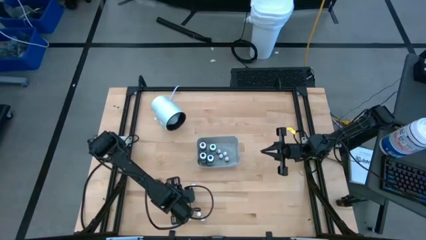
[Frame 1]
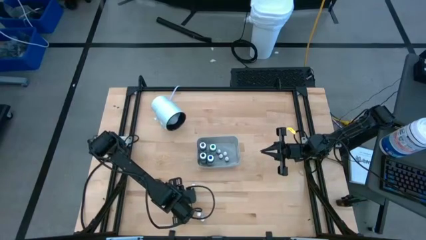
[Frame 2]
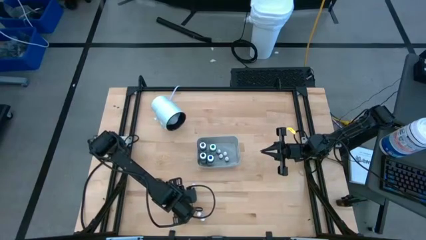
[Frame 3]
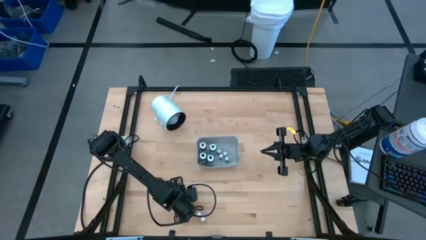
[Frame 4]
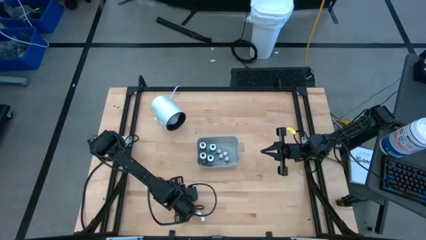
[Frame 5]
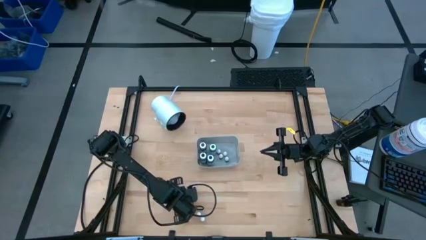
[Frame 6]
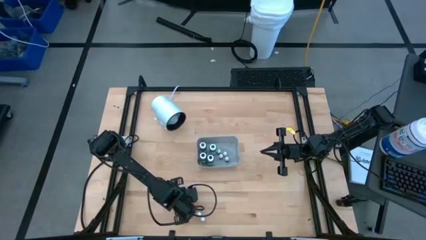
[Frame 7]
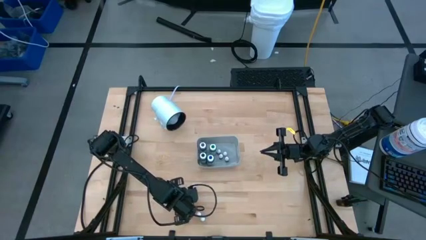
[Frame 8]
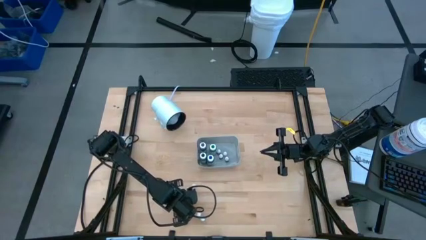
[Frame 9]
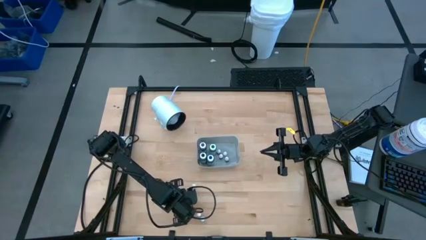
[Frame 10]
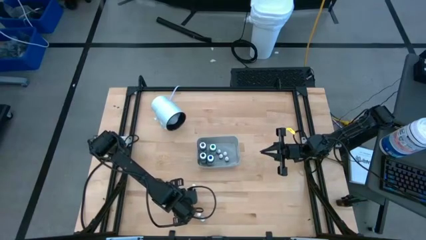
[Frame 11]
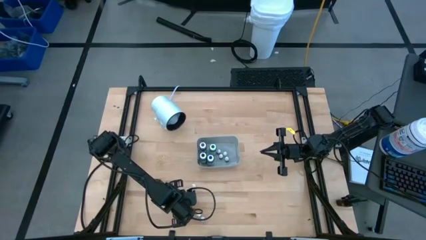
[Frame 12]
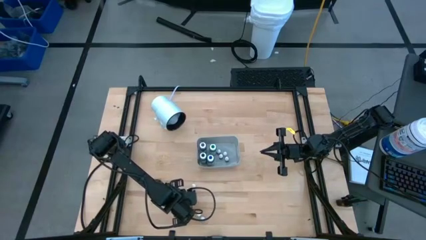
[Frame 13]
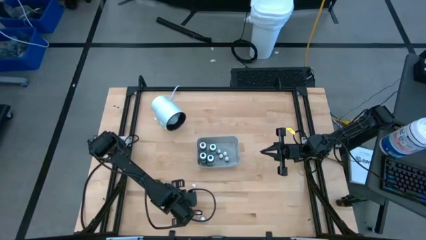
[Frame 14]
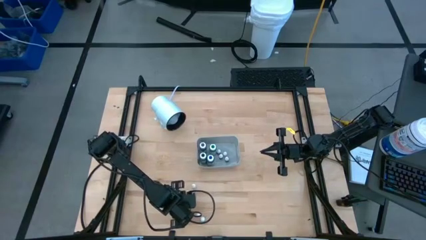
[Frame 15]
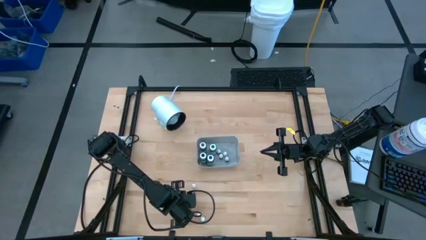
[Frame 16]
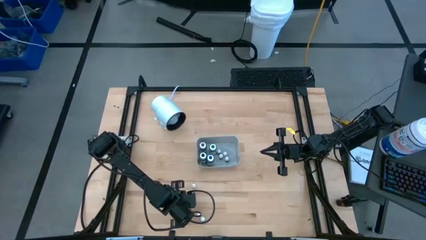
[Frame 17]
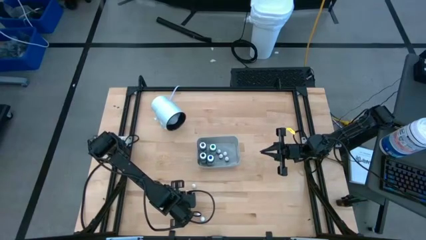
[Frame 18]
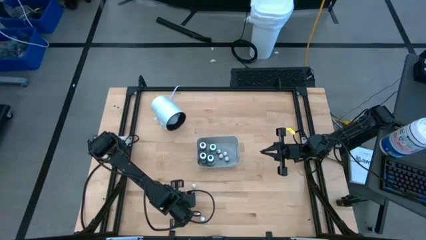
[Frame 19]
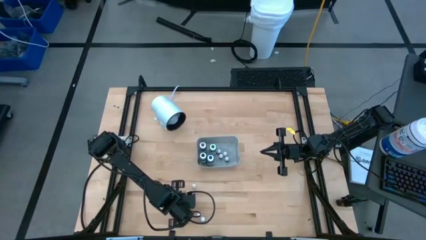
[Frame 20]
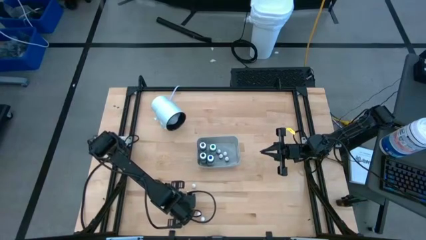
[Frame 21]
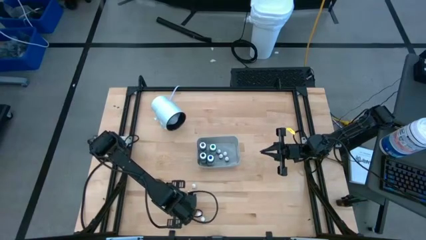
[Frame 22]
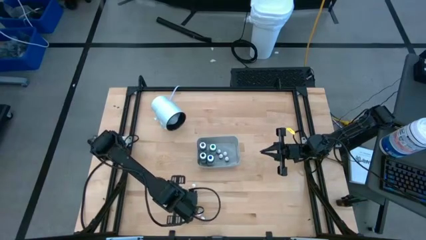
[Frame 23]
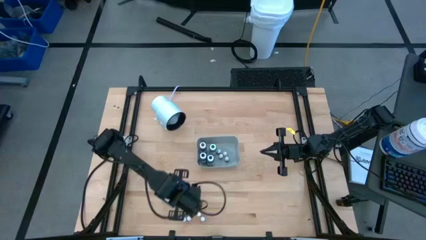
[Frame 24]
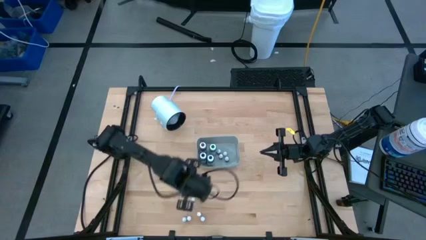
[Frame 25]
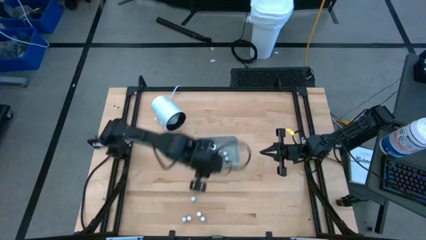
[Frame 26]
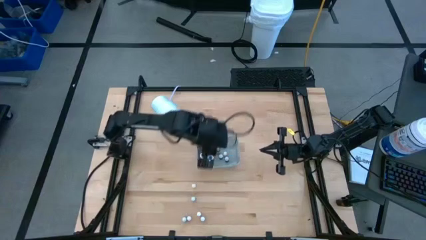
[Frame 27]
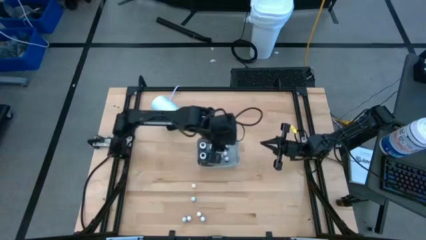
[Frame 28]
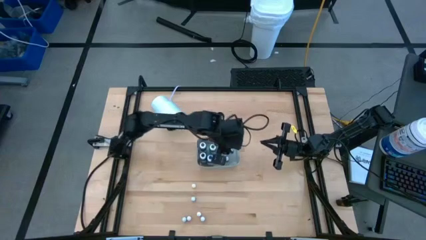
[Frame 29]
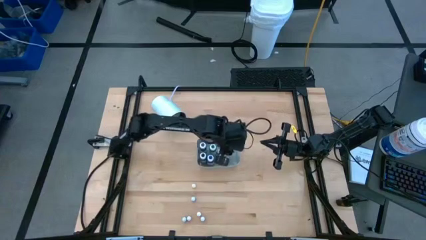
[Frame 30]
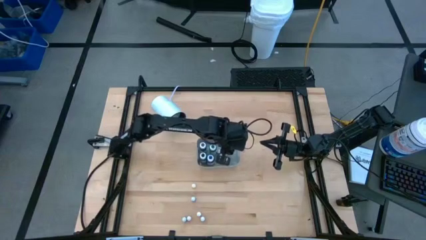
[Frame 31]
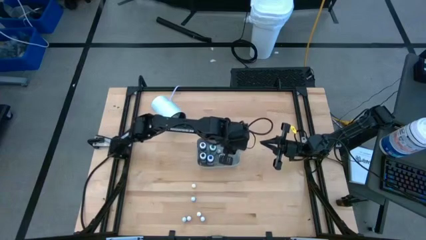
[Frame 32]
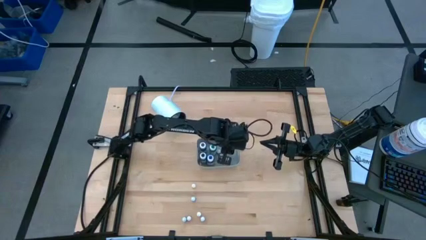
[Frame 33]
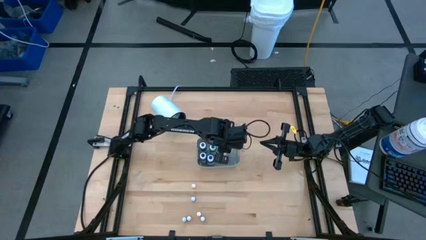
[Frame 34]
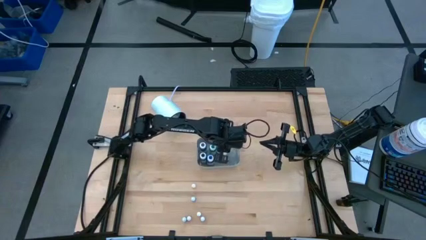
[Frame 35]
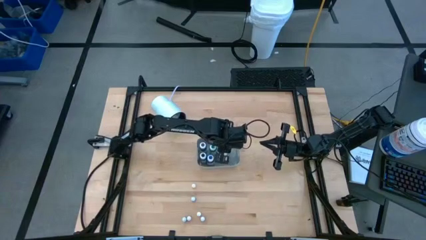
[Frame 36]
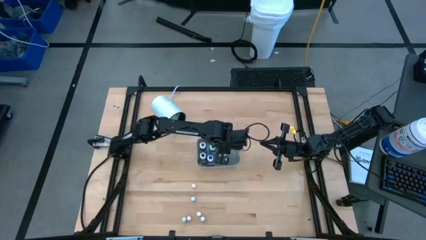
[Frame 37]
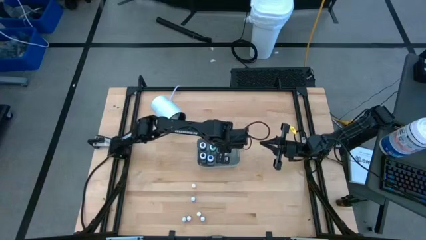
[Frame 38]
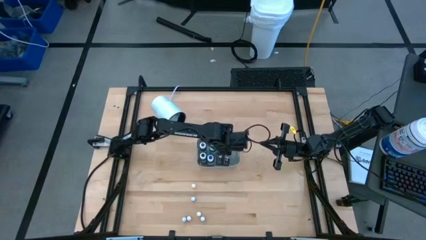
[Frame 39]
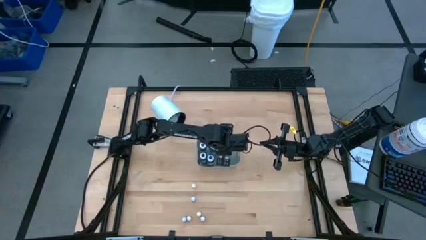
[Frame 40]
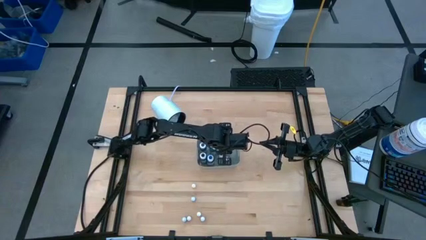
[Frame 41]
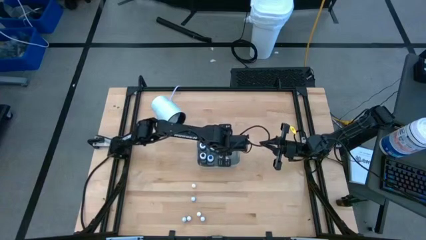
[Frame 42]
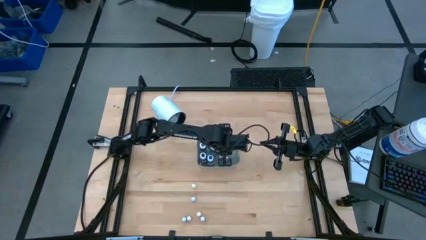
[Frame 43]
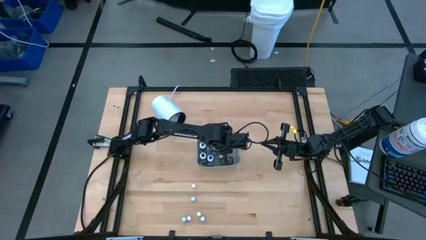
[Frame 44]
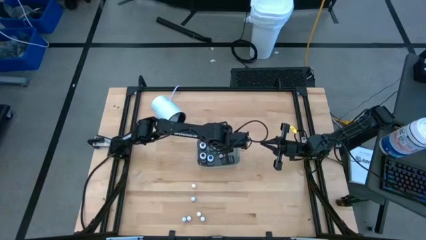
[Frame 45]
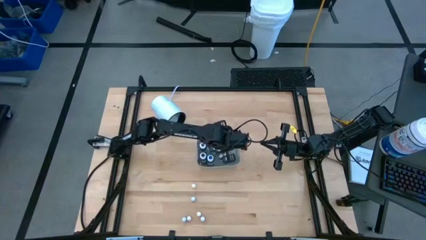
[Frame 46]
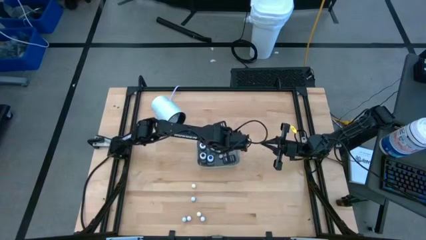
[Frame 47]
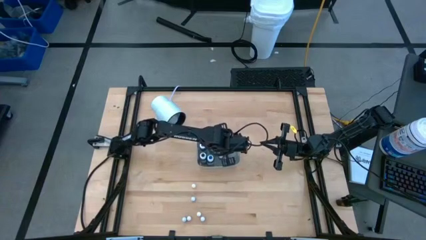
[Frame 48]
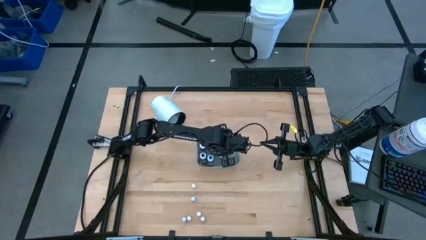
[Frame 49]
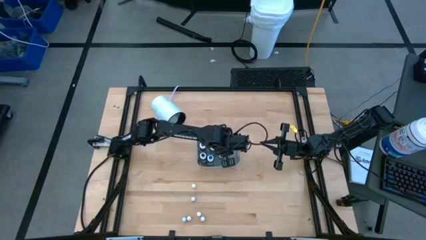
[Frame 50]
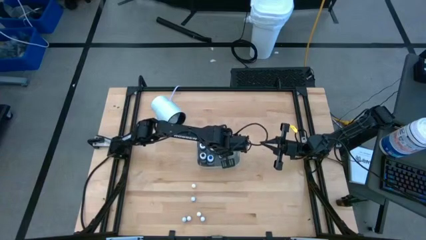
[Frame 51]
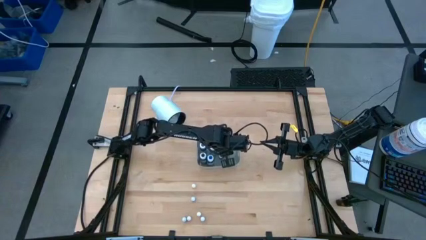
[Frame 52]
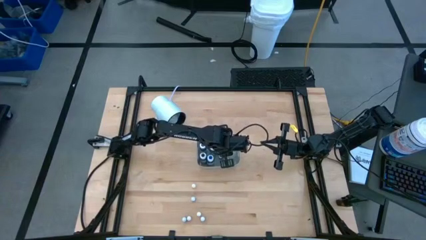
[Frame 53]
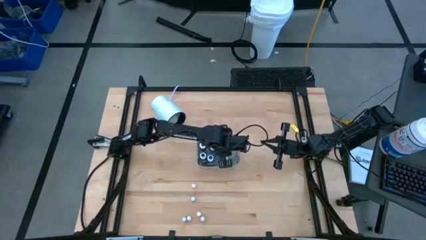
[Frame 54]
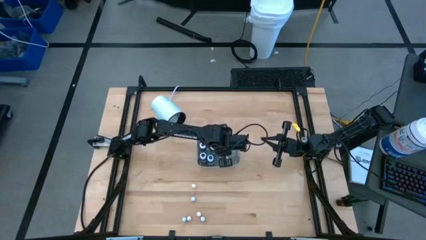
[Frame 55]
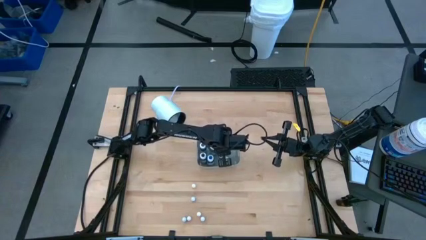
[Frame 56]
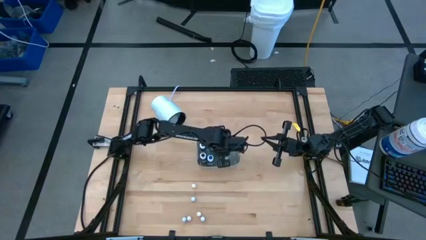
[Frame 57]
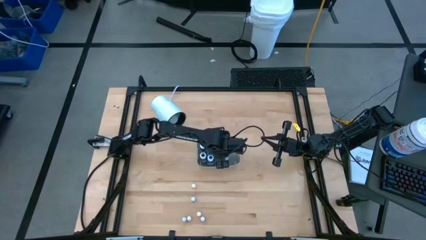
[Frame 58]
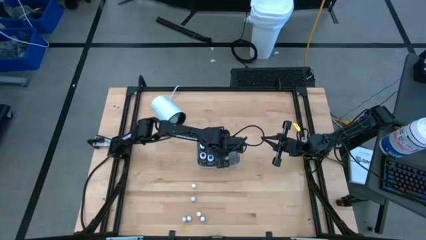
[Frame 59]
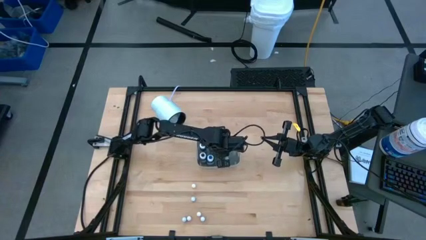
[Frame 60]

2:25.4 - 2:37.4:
Task: Pick & Place food coloring
Put the small black food coloring bottle into the gray bin
